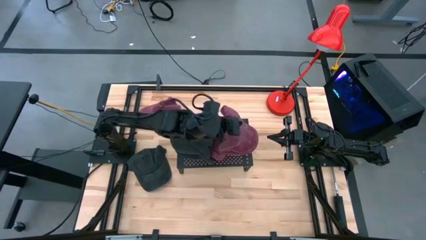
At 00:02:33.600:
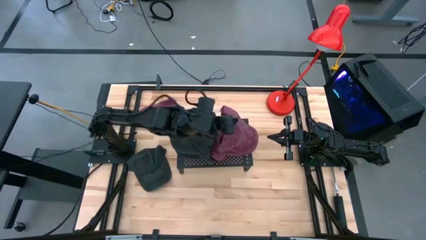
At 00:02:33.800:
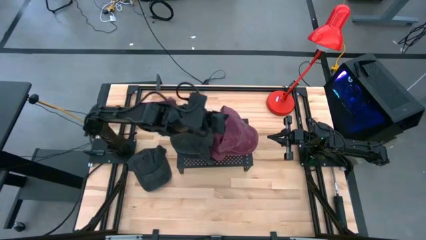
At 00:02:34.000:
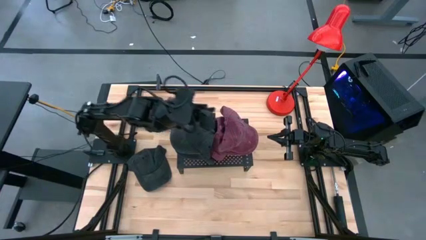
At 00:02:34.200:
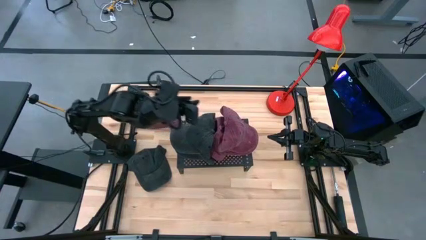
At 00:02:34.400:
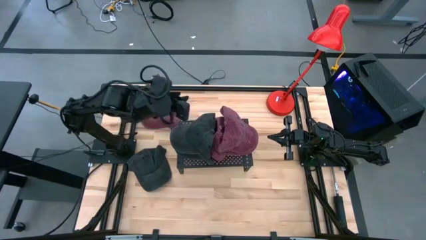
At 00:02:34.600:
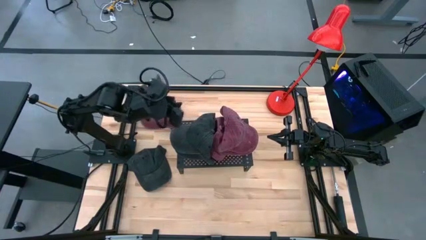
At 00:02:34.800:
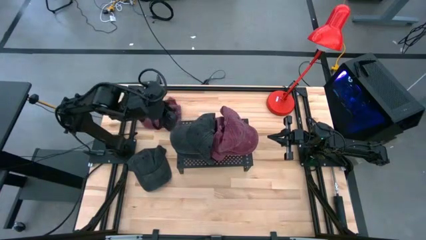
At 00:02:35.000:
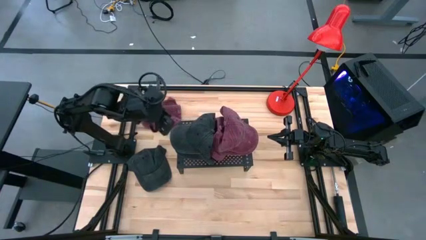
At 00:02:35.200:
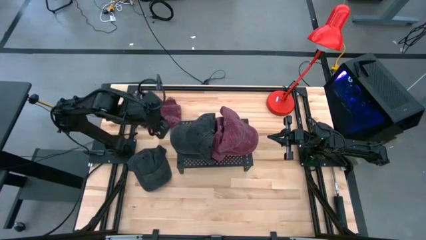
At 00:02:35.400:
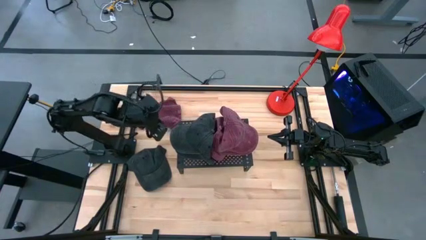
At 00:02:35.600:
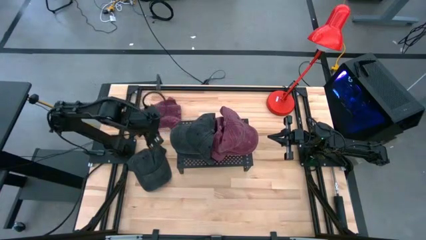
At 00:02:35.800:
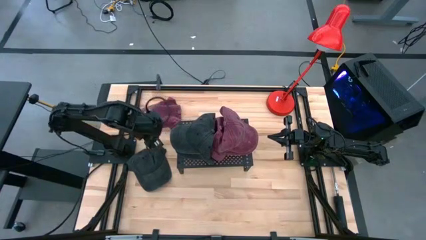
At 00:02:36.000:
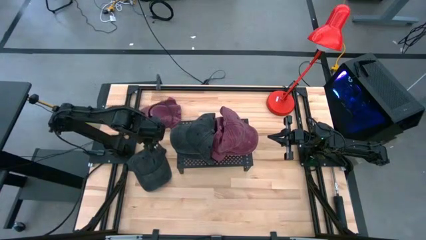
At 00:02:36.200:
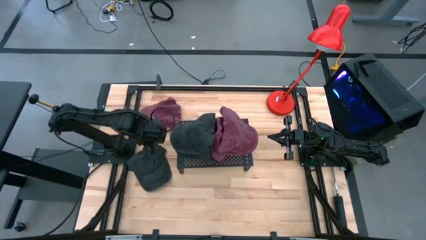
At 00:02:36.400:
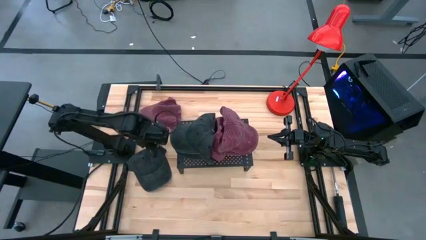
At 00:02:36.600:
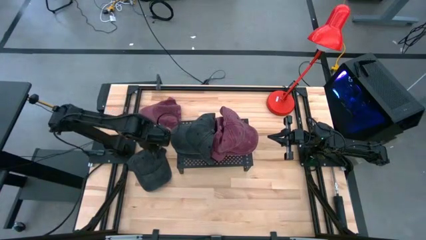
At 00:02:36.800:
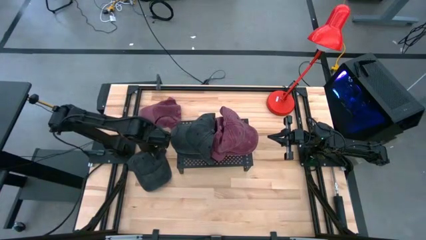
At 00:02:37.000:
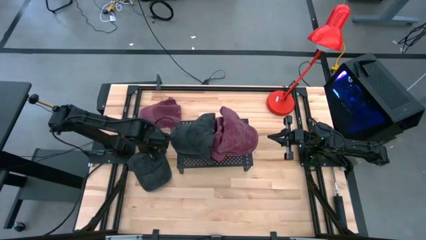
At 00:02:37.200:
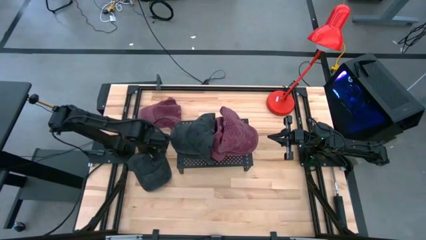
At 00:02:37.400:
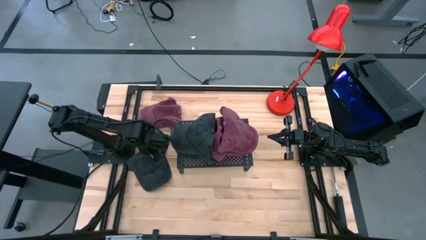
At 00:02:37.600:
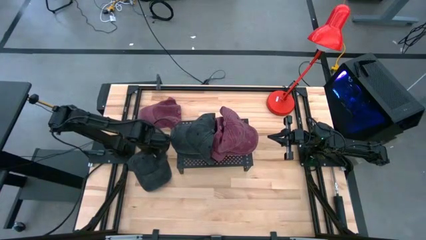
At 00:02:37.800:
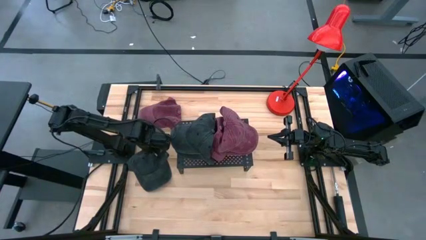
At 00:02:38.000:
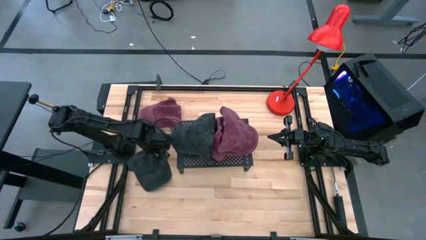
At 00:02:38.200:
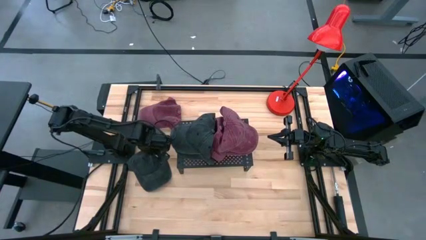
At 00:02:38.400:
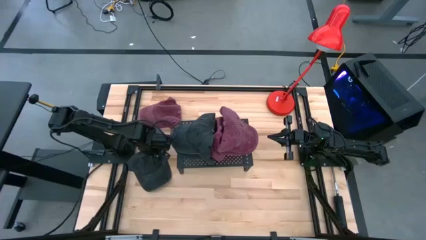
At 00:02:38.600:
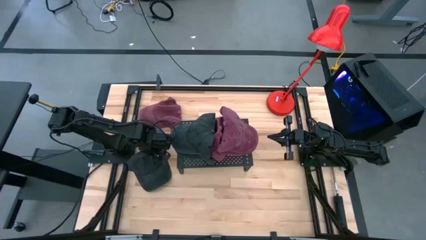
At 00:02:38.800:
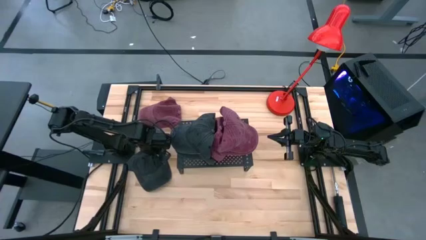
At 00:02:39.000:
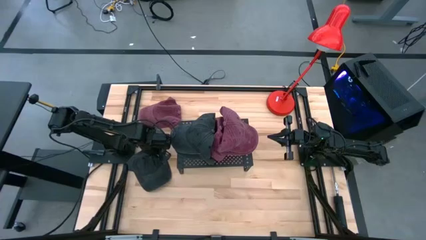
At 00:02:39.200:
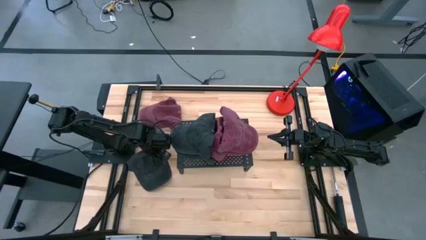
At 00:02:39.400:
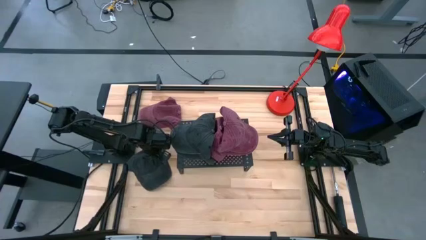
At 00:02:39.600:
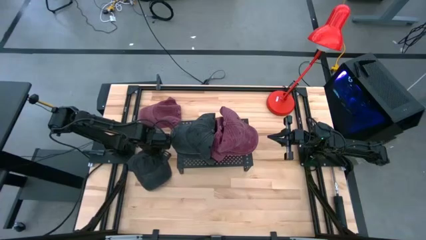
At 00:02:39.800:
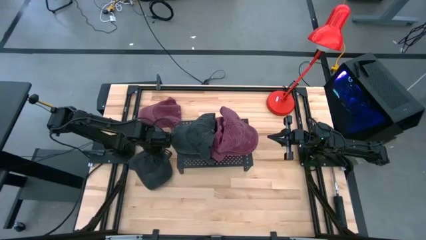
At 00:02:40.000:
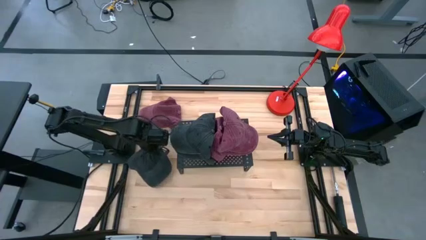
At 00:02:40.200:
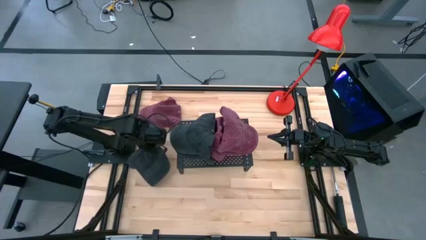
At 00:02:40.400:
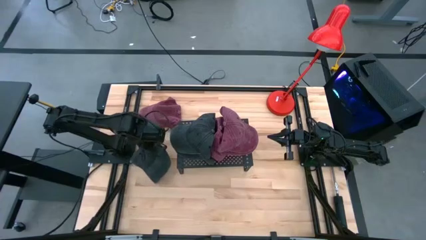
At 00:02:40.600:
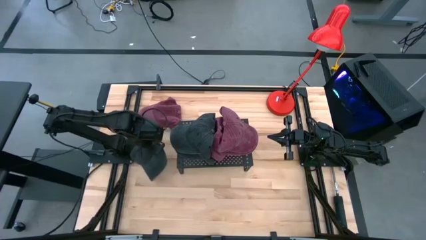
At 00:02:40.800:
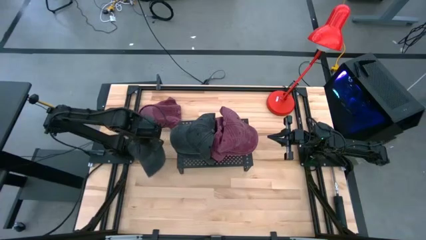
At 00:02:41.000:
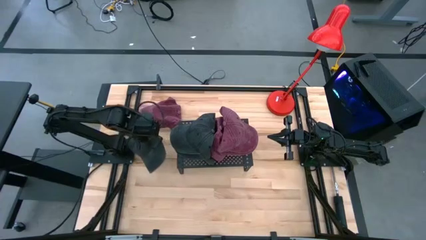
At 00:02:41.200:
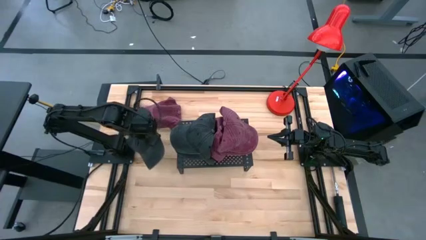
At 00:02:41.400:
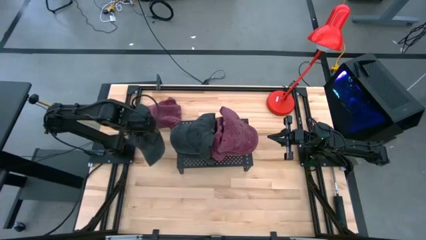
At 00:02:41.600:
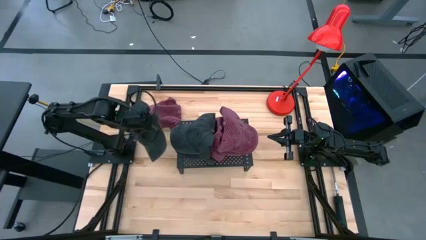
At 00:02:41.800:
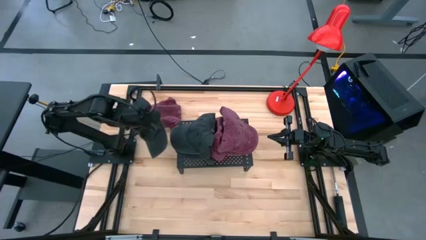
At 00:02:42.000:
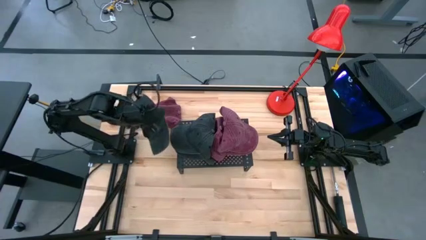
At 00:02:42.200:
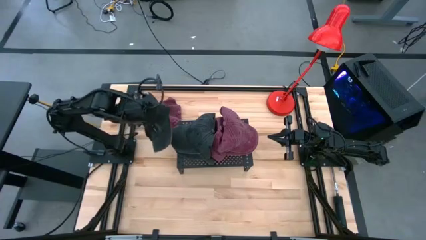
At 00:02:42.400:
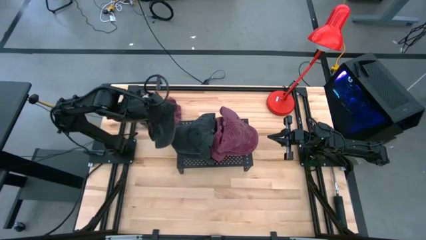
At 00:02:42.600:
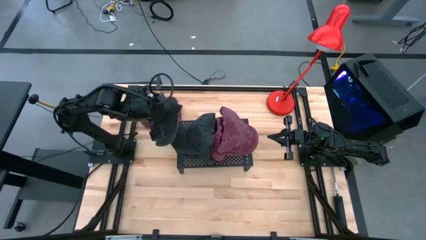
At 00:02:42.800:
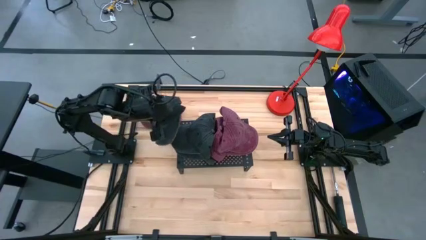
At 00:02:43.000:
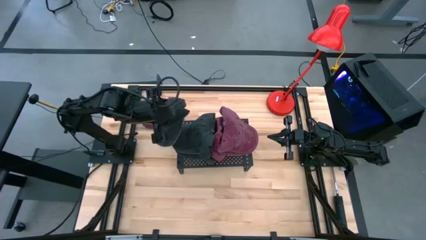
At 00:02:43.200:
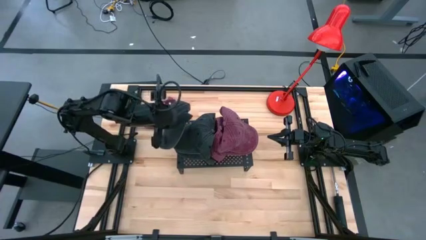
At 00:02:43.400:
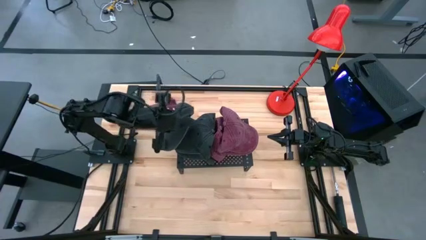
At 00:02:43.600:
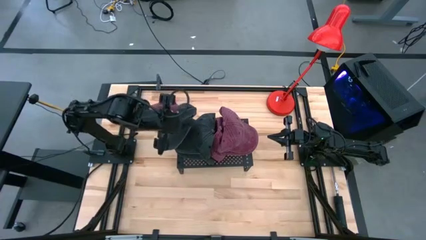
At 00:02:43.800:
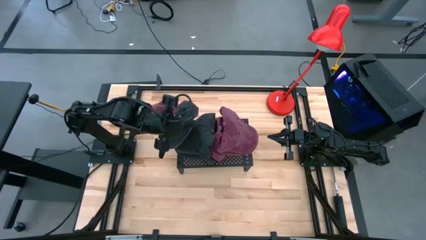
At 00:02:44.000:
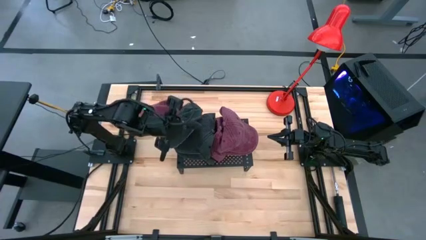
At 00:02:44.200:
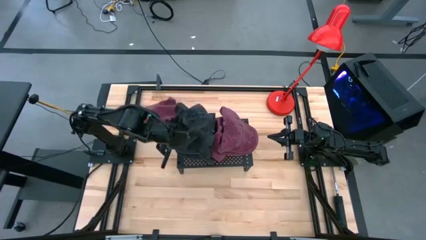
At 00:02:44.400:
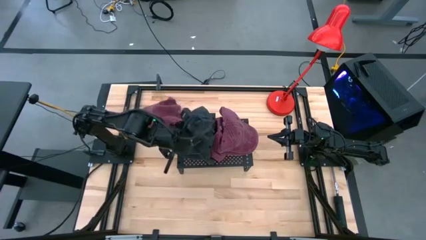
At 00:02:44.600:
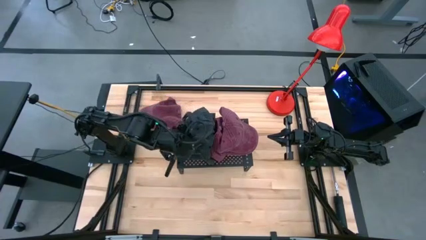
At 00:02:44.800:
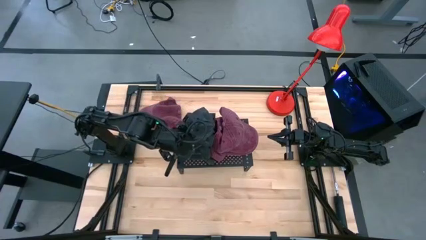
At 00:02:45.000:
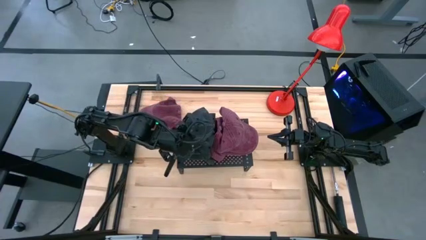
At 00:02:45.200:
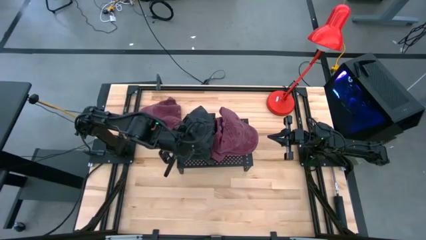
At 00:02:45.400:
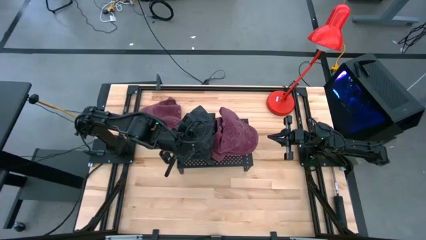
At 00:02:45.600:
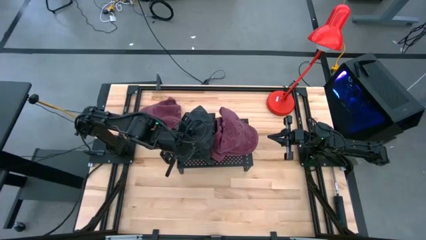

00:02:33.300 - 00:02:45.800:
Task: Pick & Place hat
Stack the black cap on top of the black cap on the shelf

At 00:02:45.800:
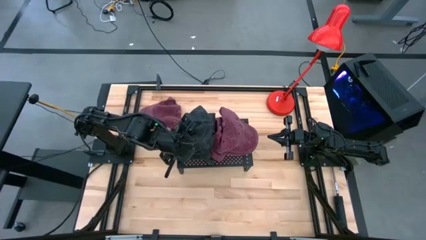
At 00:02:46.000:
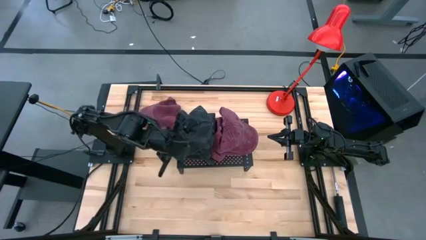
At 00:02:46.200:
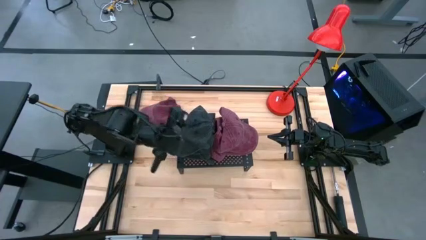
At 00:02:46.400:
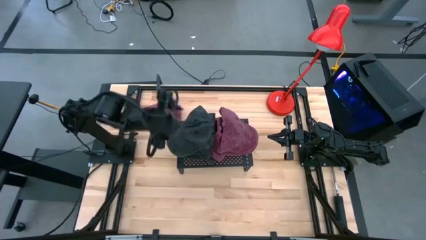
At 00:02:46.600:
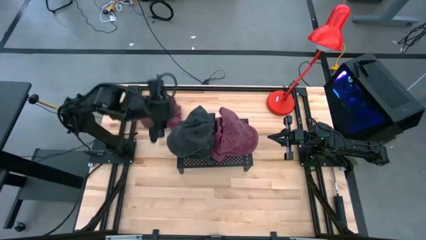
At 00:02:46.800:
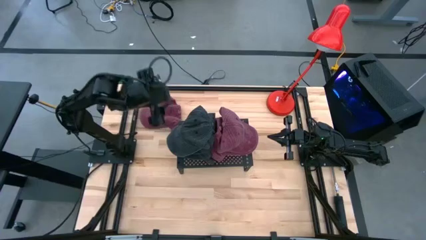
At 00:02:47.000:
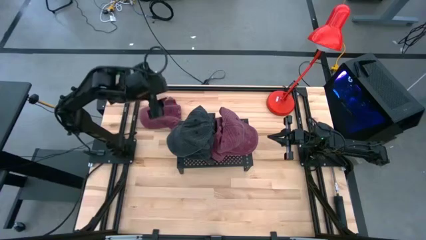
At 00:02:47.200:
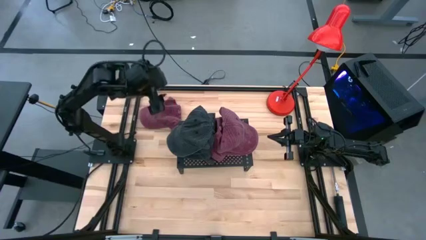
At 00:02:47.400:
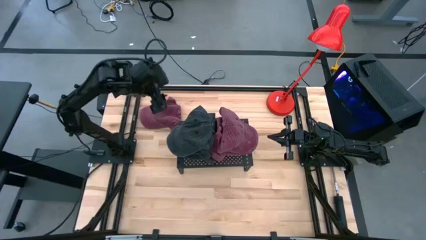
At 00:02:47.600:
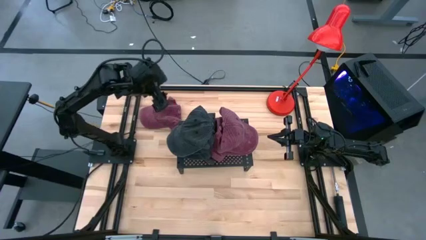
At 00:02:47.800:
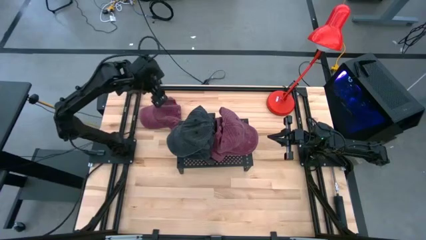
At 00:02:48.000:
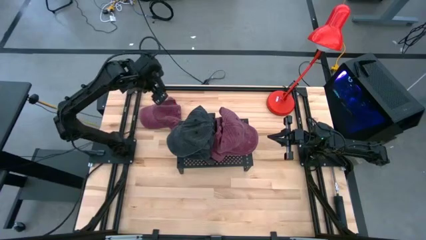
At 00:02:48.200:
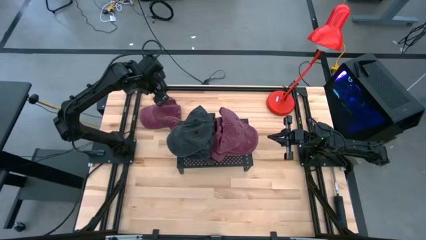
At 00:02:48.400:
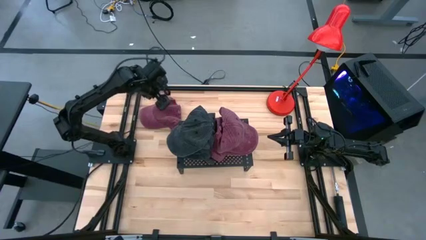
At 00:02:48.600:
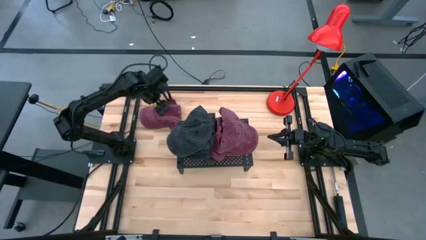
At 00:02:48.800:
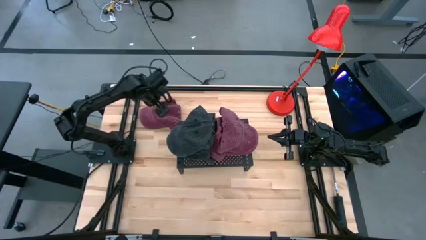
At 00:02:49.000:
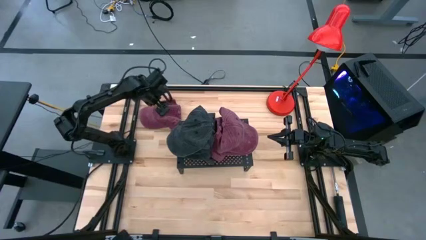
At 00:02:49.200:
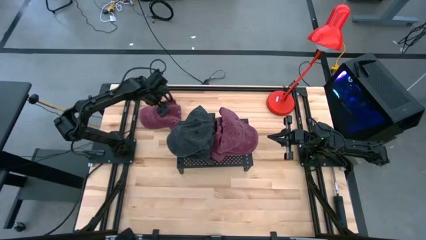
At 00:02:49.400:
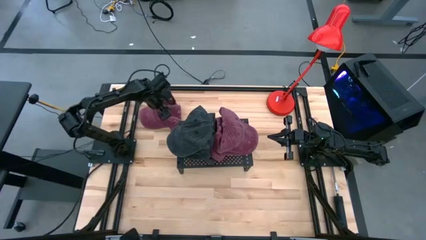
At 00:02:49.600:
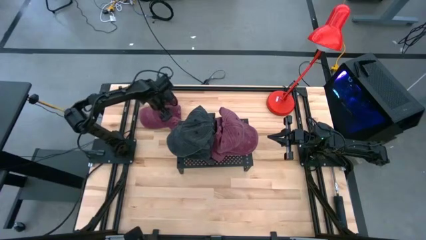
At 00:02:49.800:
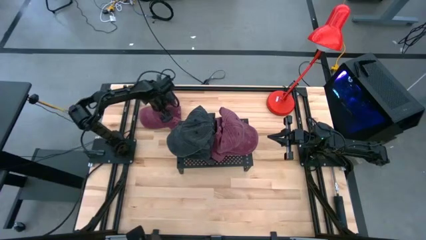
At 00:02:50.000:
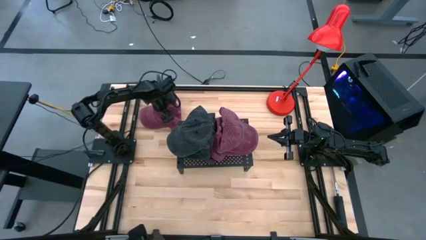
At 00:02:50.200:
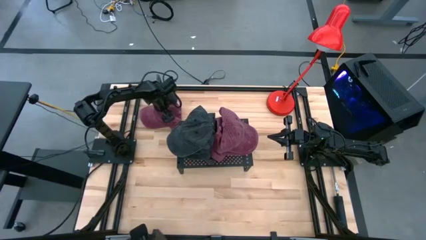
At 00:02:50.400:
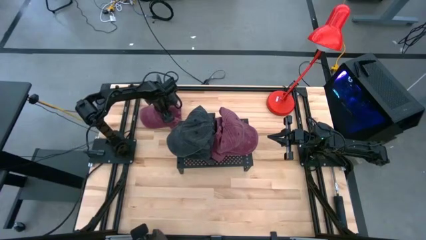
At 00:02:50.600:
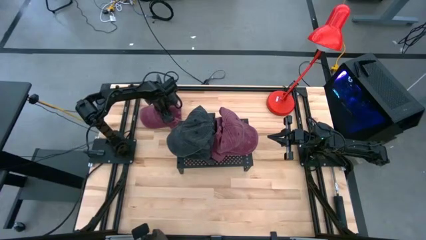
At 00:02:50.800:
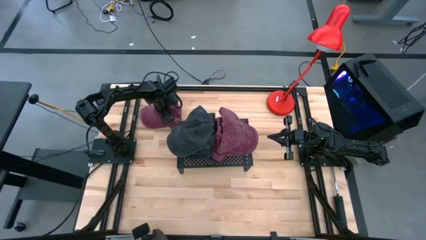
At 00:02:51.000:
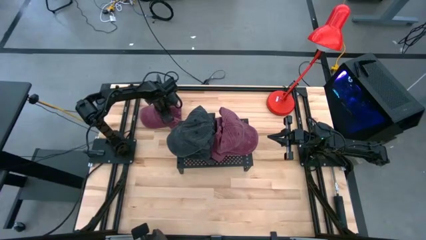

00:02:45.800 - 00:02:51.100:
Stack the red cap on top of the red cap on the shelf
